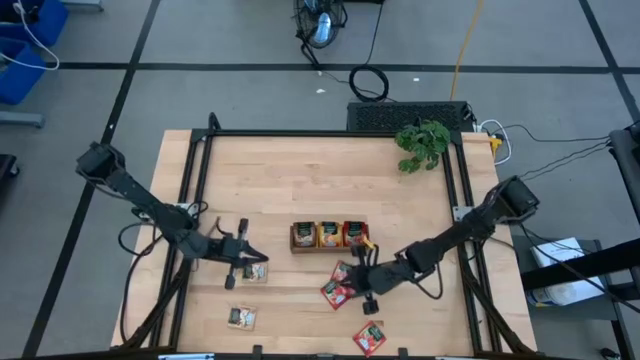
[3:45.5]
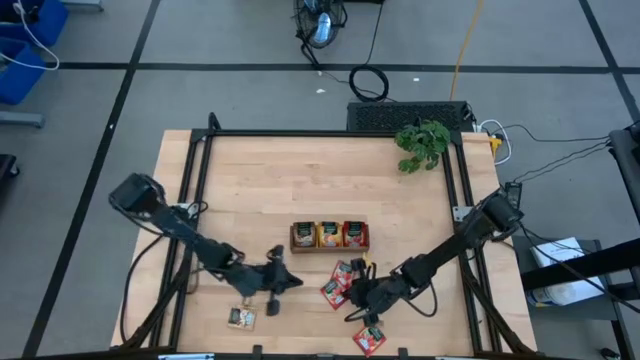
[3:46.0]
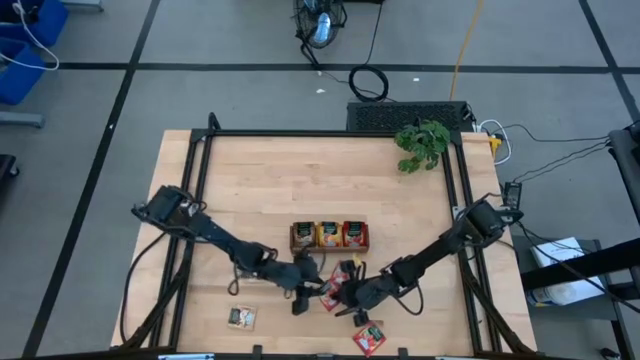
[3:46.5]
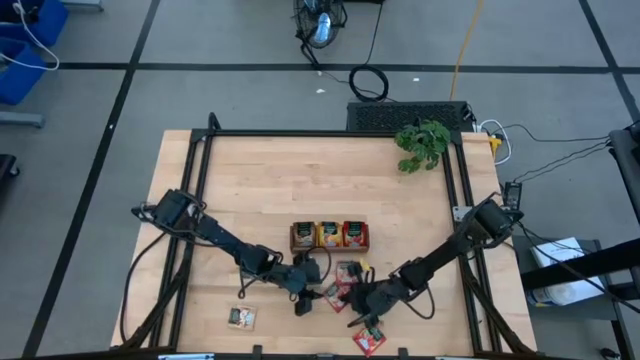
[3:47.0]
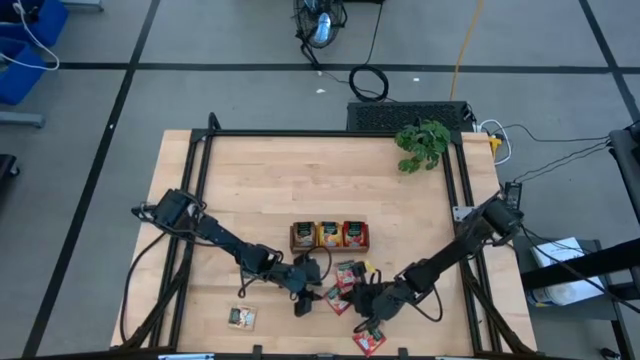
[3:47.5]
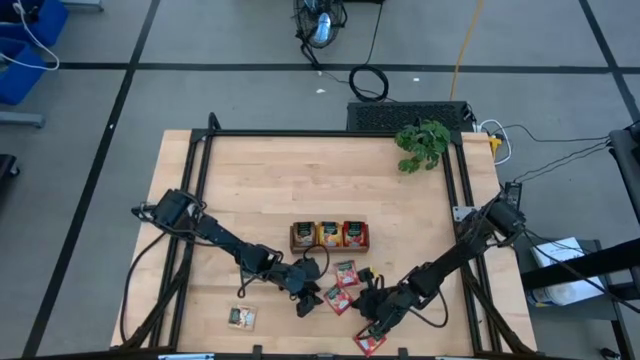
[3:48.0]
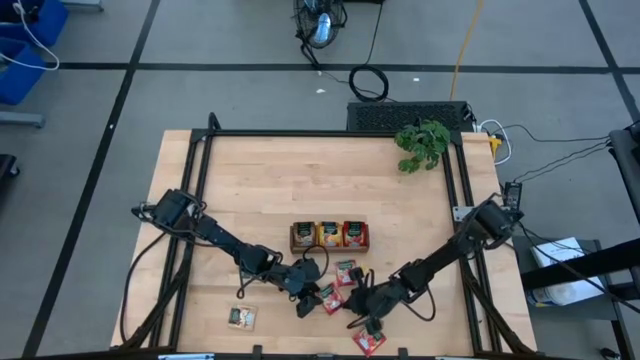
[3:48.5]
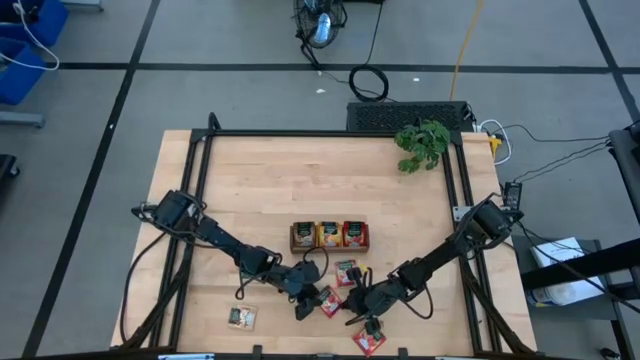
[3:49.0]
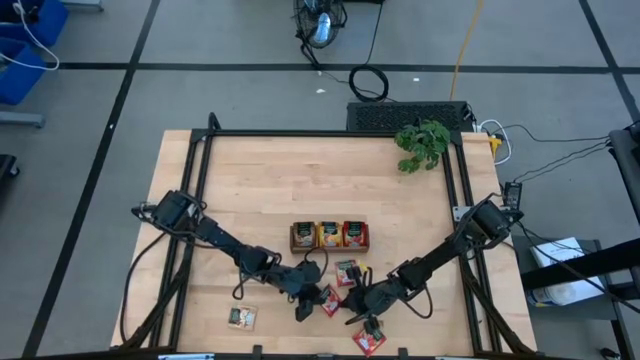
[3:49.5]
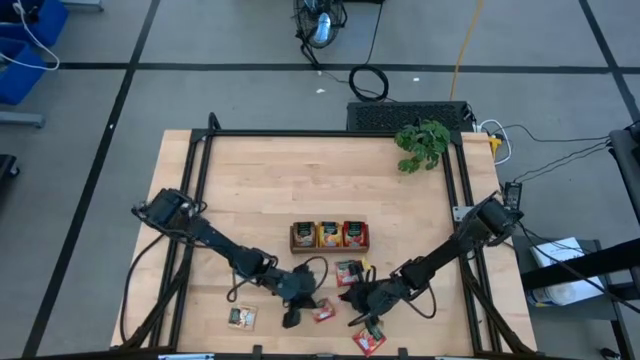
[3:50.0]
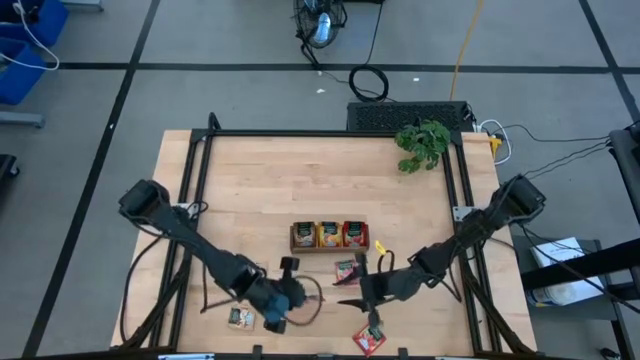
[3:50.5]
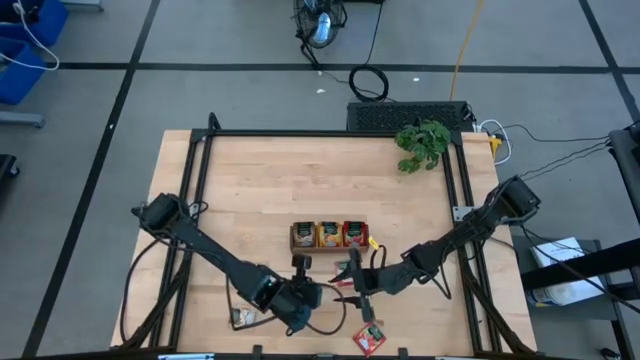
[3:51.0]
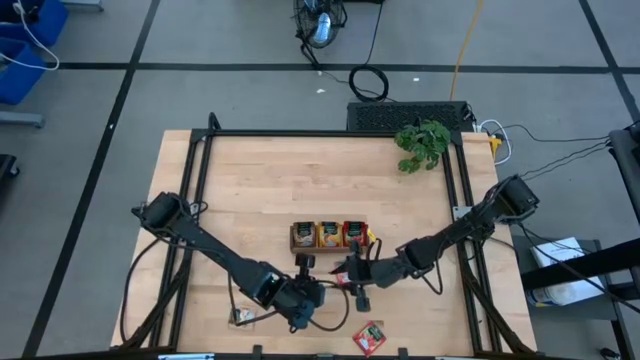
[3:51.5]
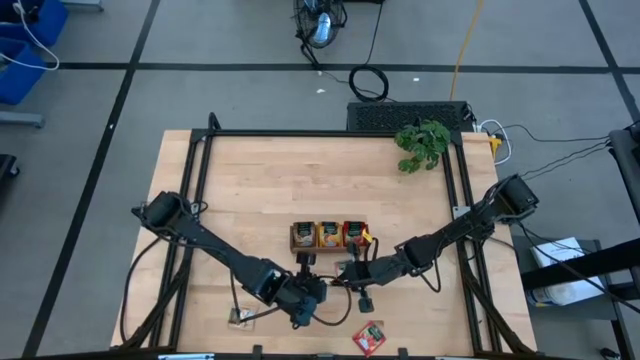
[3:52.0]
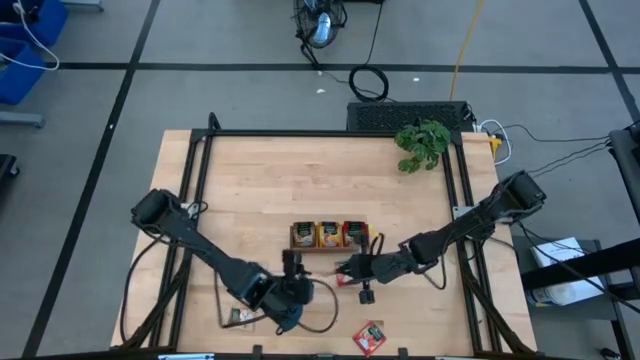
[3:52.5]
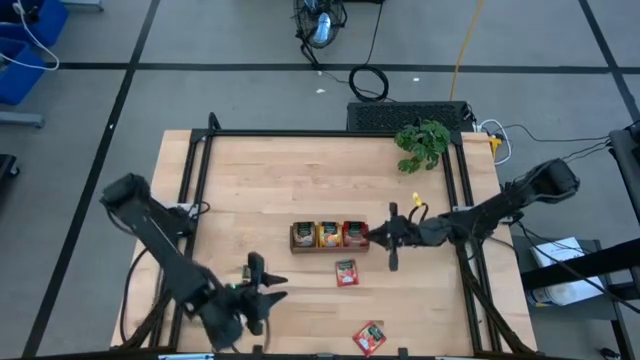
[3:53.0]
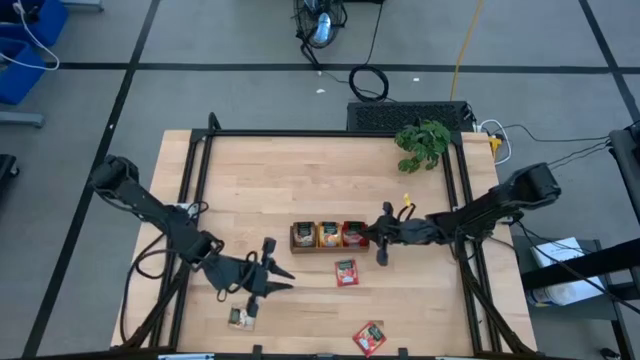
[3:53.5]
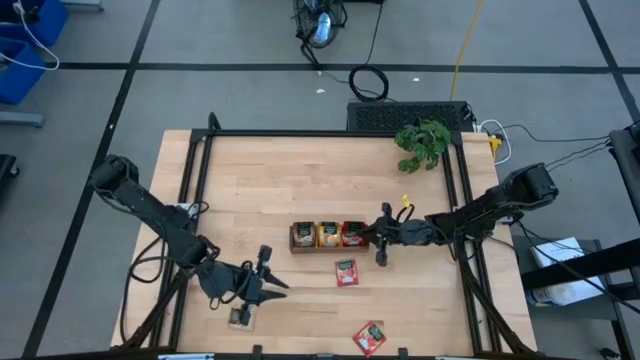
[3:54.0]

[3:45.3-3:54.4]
Task: Pick & Place Tea
Put the red tea bag into the right section of the wooden organizer

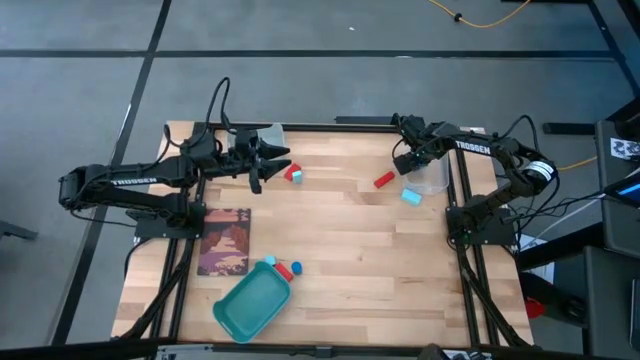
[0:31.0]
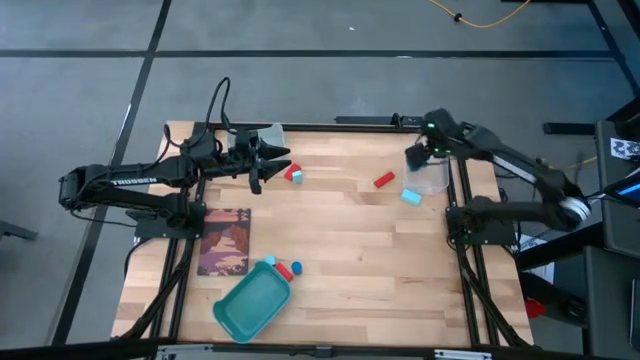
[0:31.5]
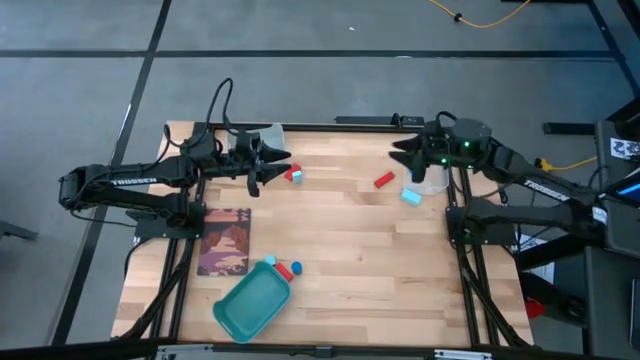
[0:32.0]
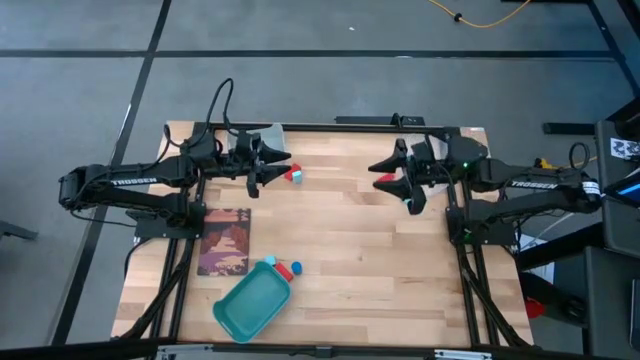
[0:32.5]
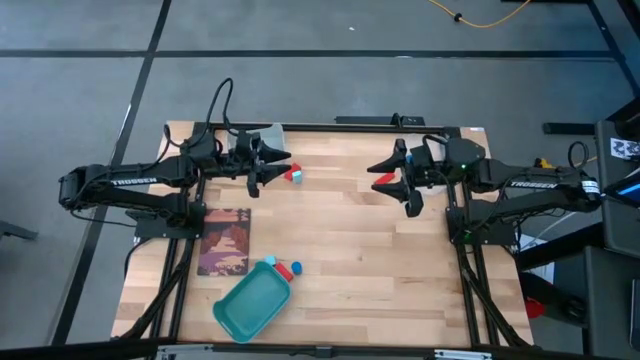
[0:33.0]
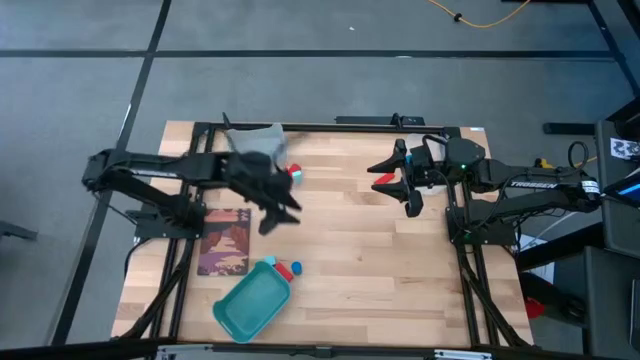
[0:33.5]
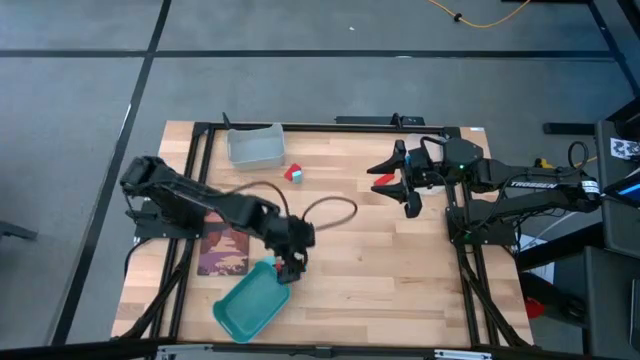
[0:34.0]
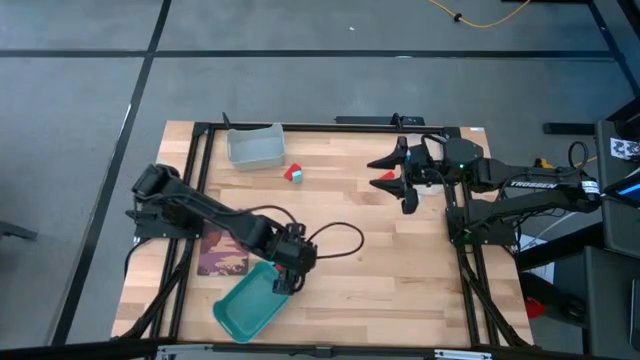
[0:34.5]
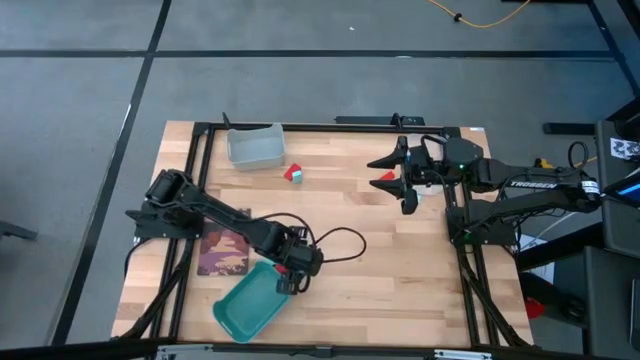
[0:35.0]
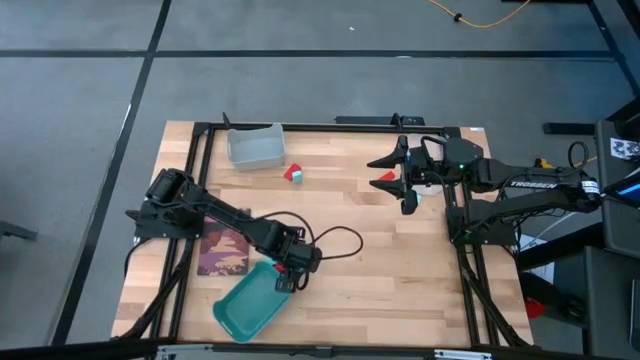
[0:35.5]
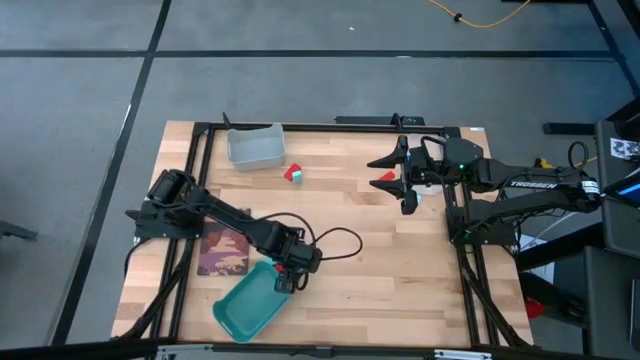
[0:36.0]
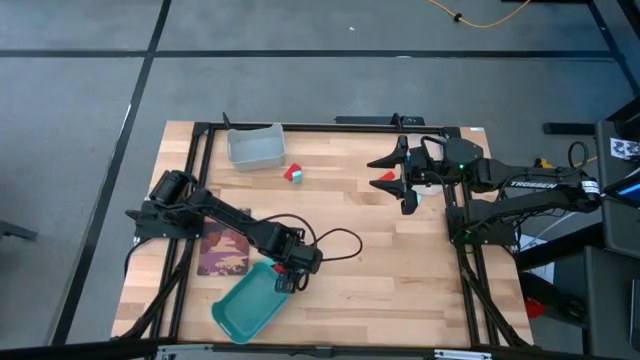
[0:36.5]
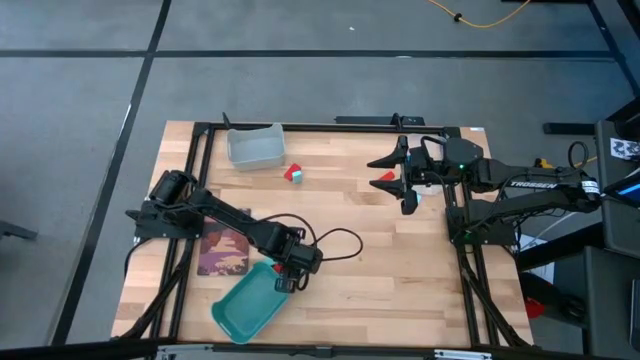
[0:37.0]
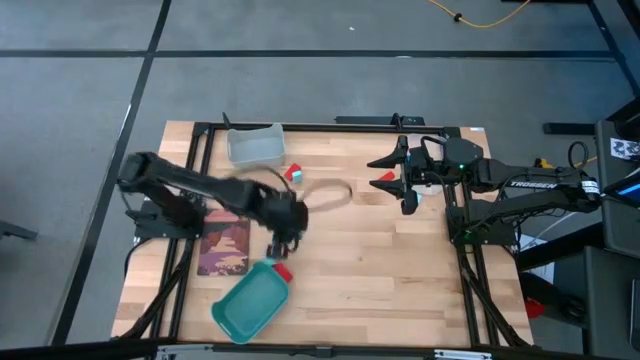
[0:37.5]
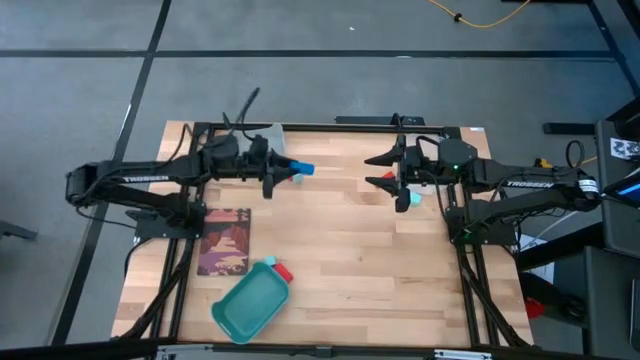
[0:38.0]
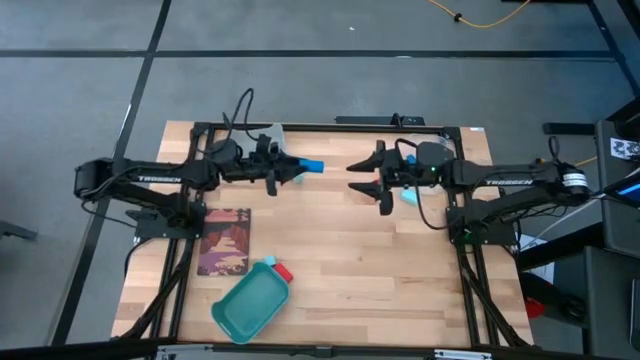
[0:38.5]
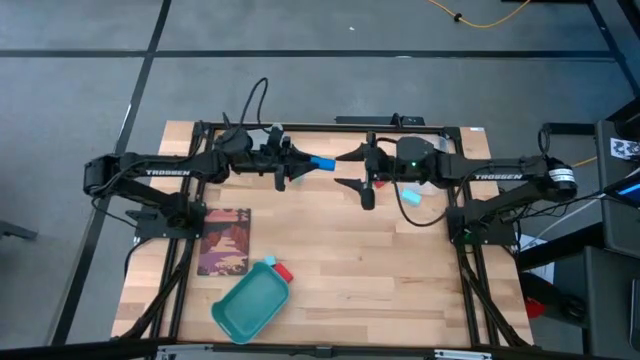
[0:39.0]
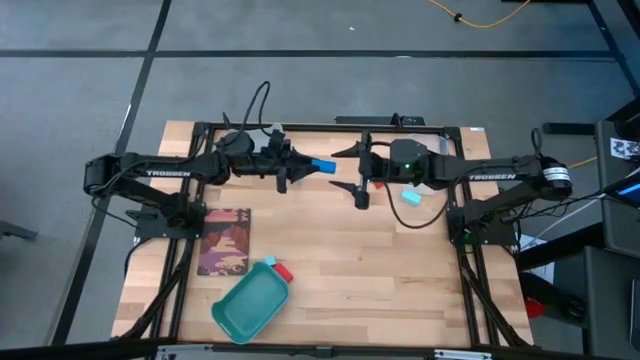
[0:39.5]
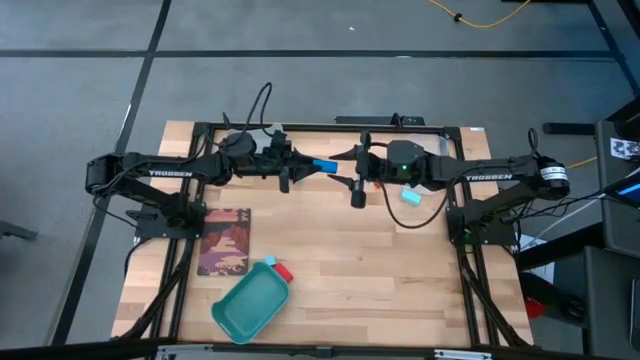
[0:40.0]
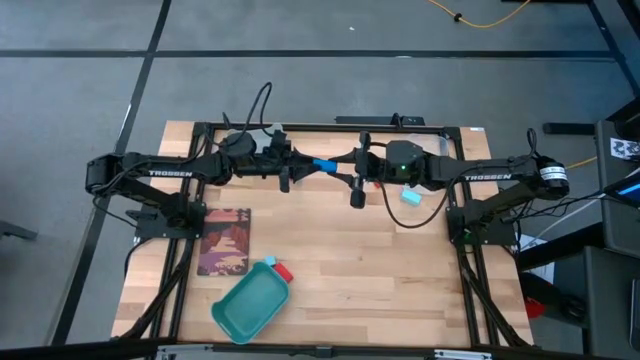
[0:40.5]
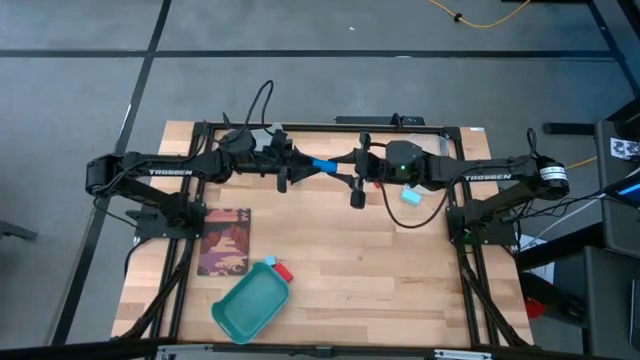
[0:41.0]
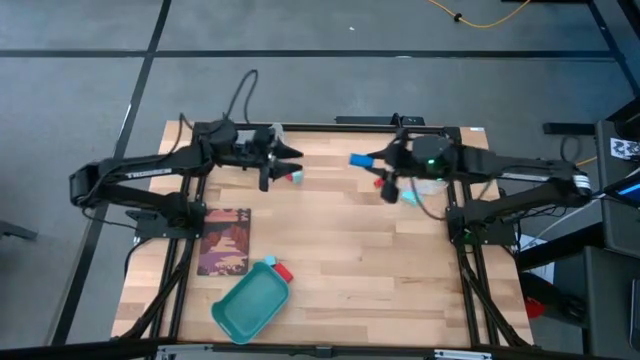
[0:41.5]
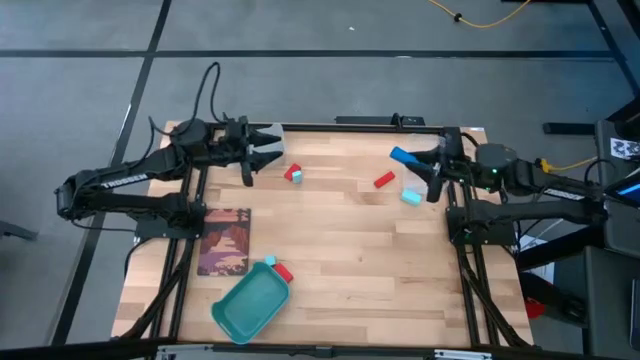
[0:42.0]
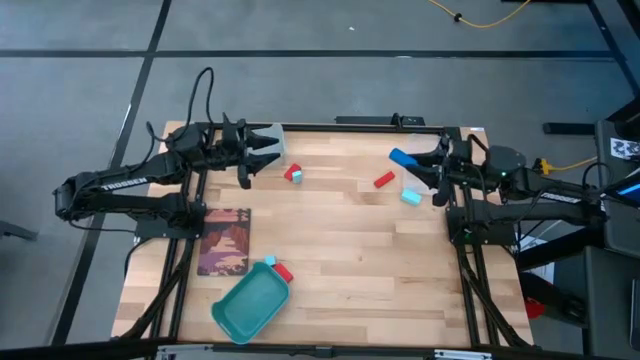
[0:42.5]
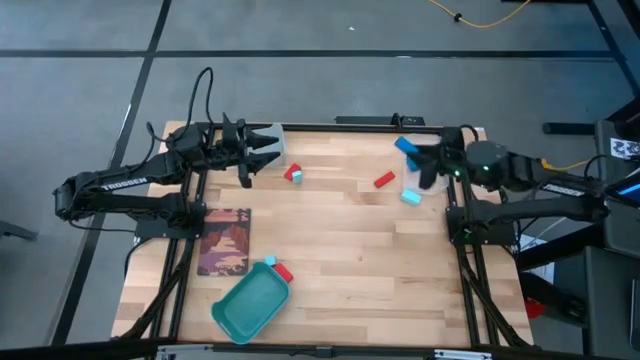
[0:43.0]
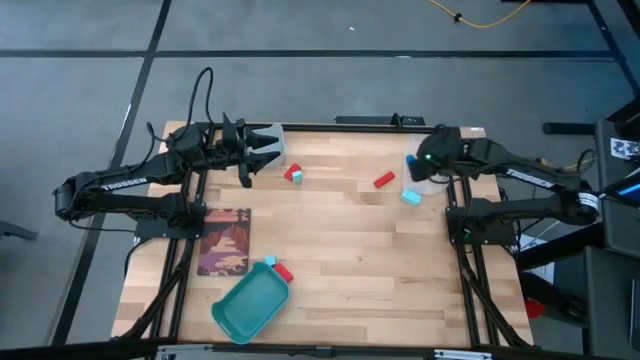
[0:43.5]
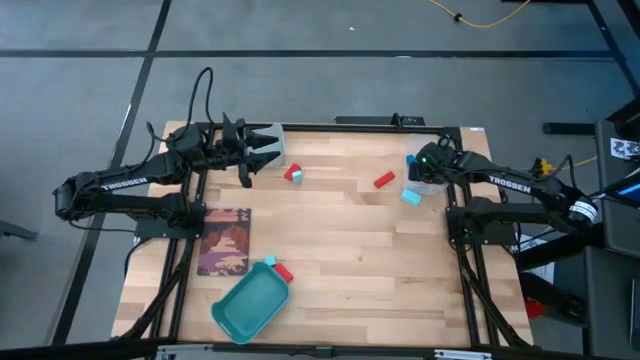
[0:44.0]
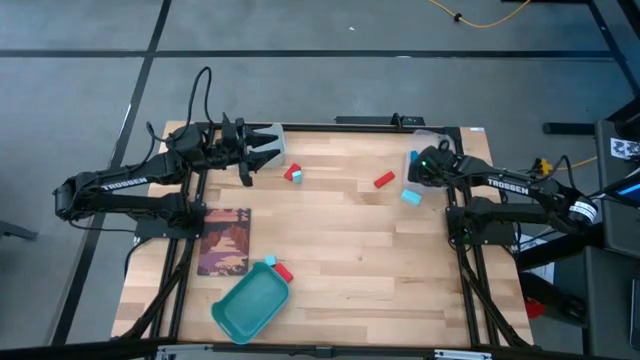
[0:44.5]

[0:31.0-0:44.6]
Task: Sort & place blocks by color
Put the blue block into the transparent bin
